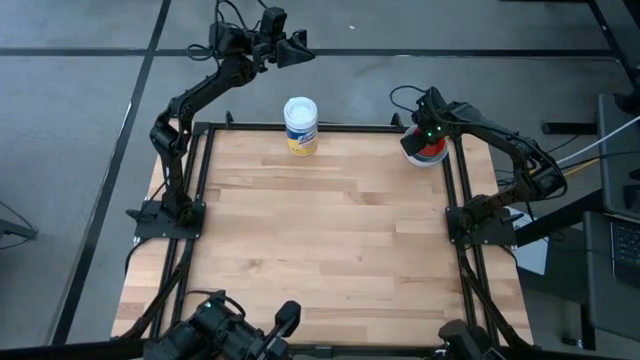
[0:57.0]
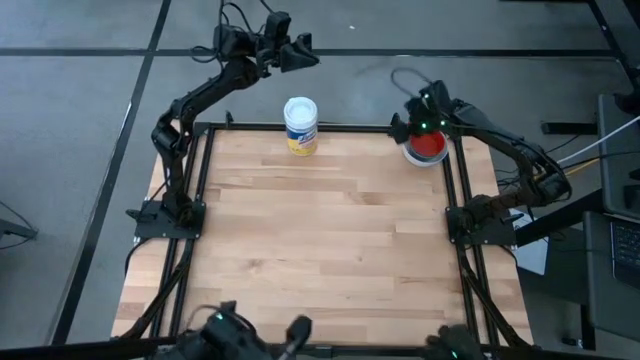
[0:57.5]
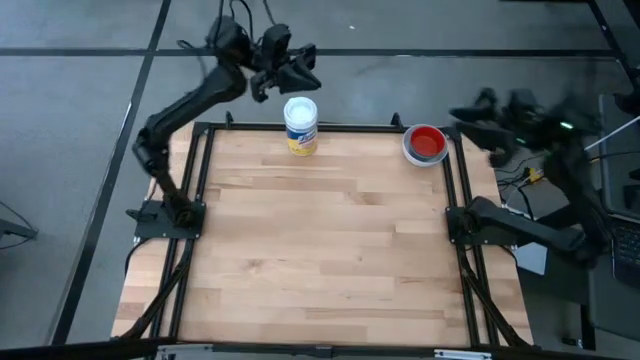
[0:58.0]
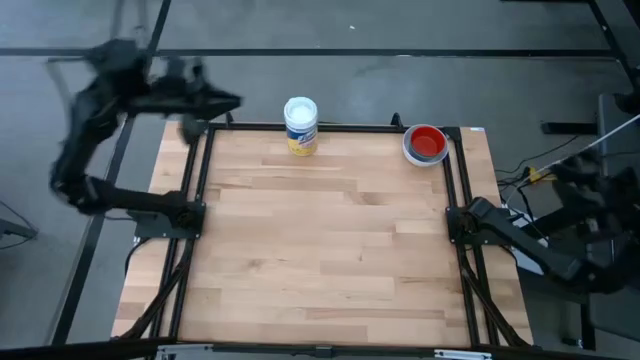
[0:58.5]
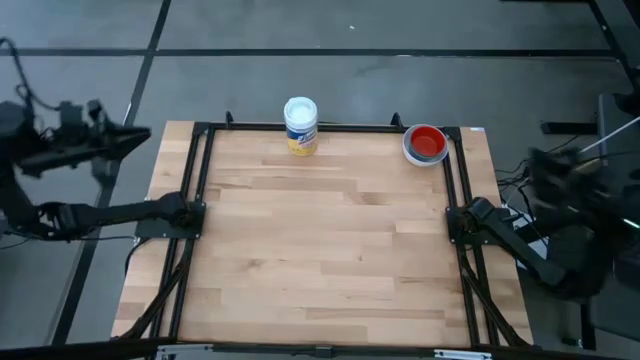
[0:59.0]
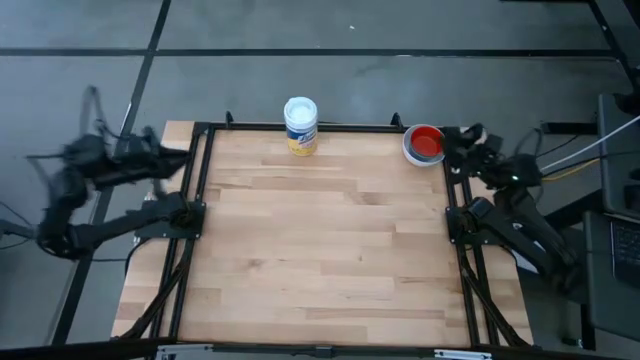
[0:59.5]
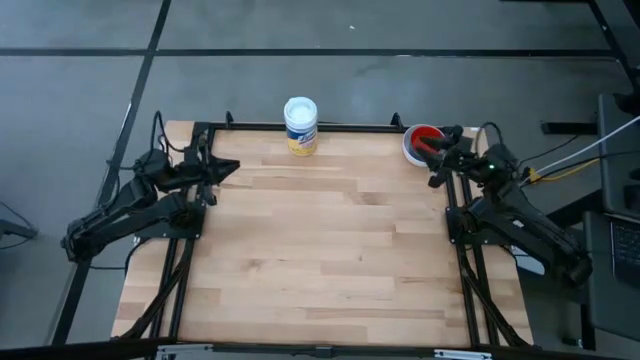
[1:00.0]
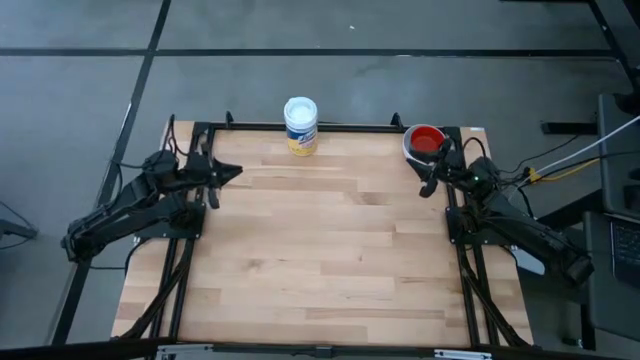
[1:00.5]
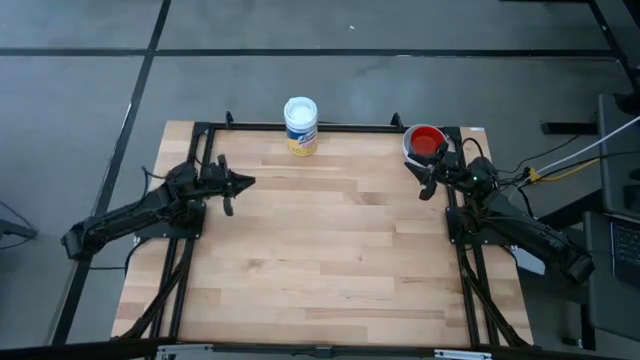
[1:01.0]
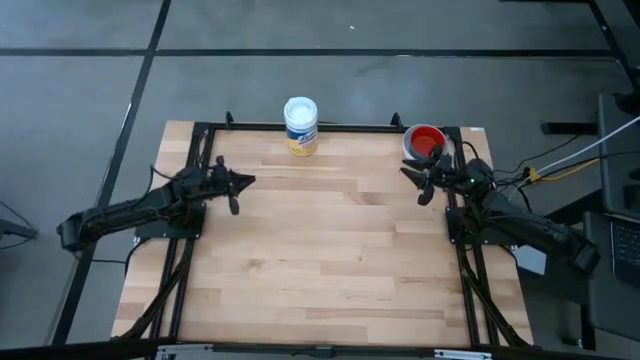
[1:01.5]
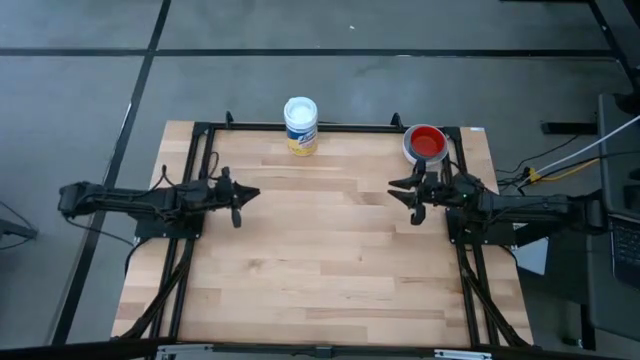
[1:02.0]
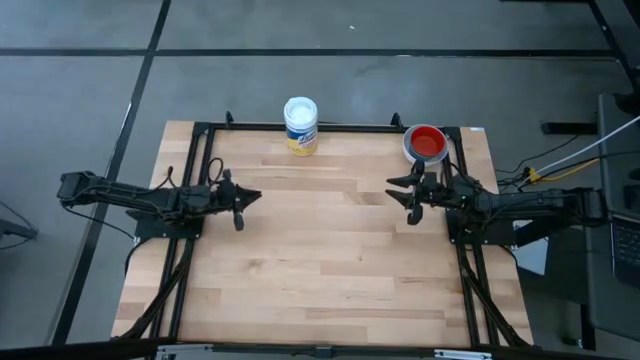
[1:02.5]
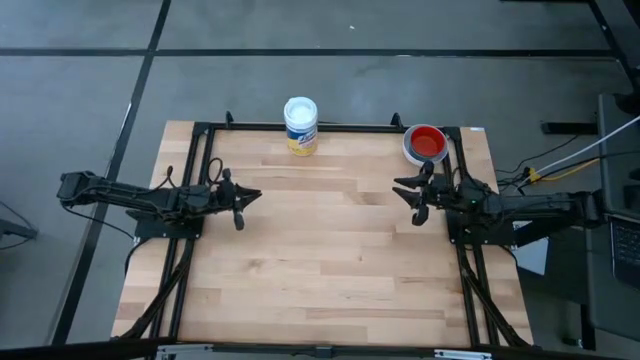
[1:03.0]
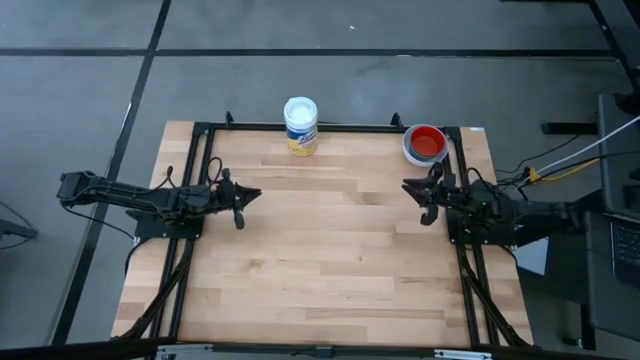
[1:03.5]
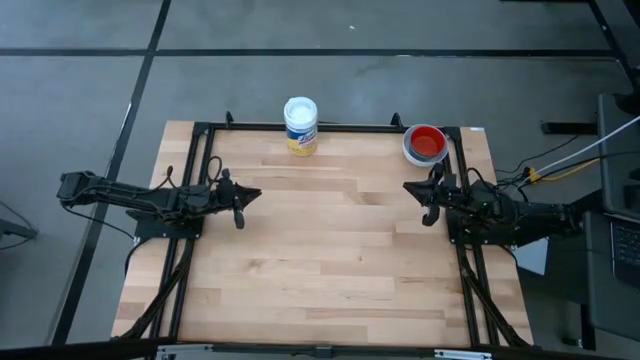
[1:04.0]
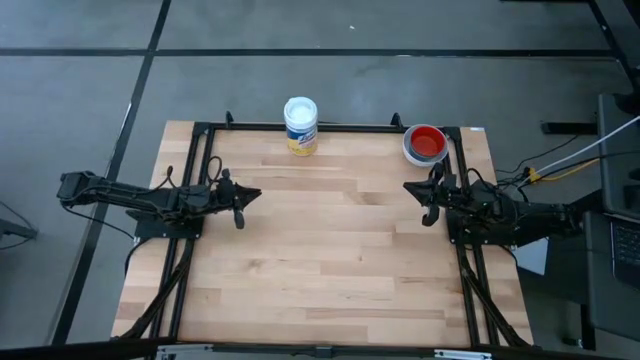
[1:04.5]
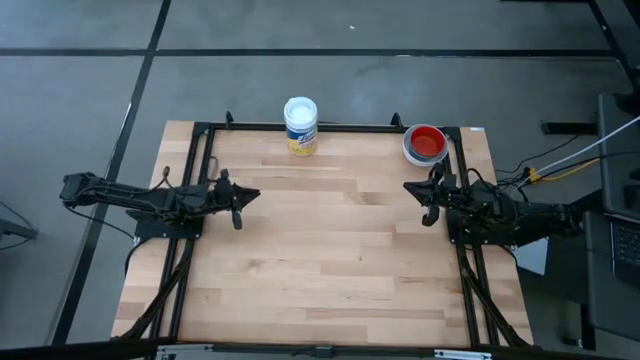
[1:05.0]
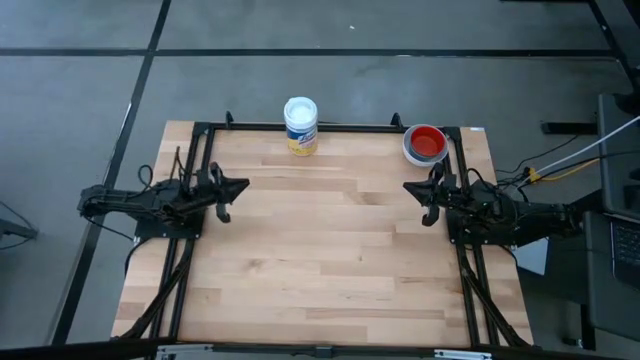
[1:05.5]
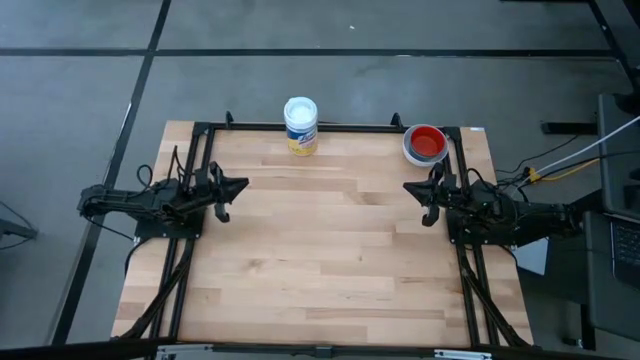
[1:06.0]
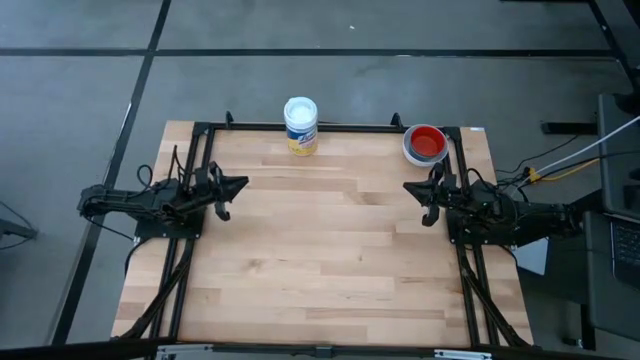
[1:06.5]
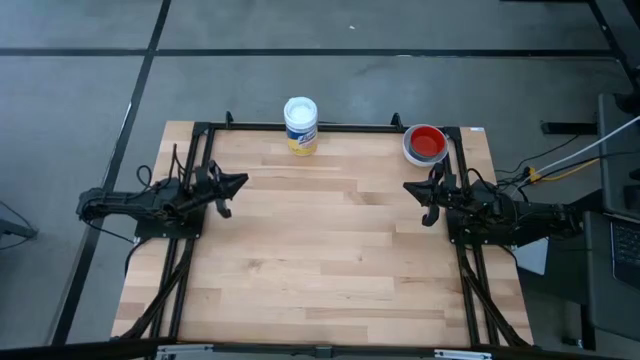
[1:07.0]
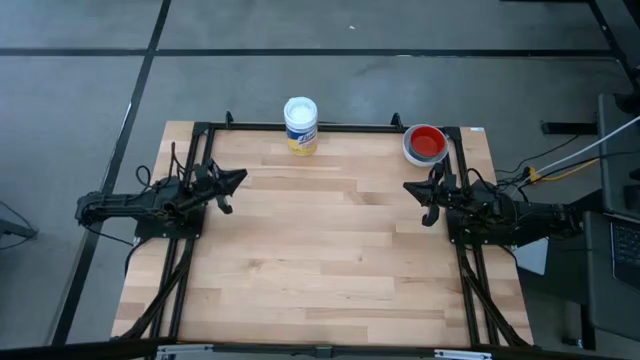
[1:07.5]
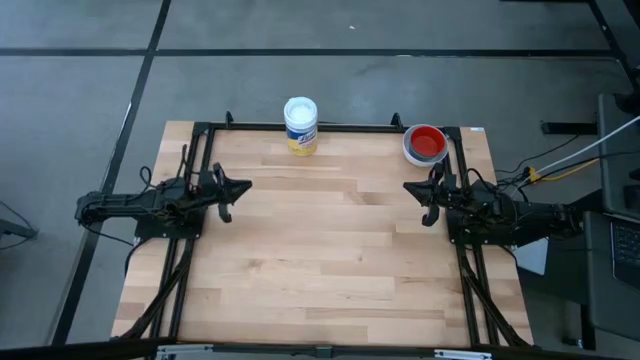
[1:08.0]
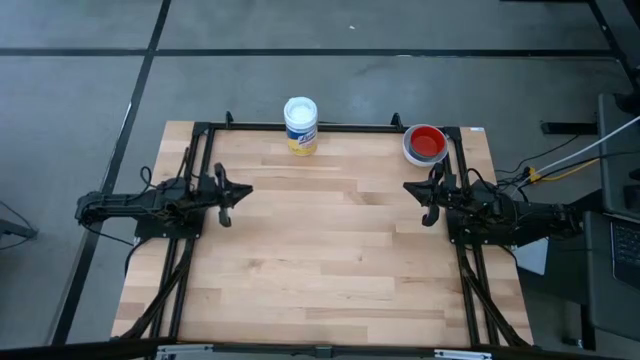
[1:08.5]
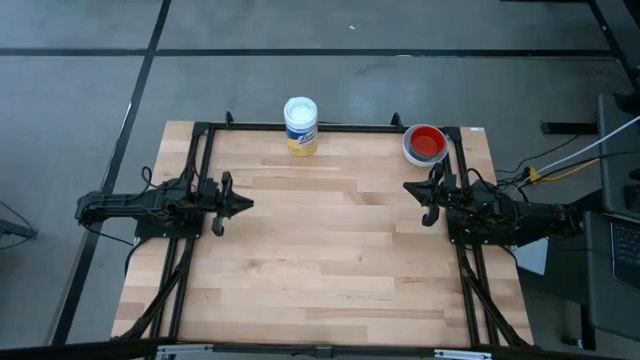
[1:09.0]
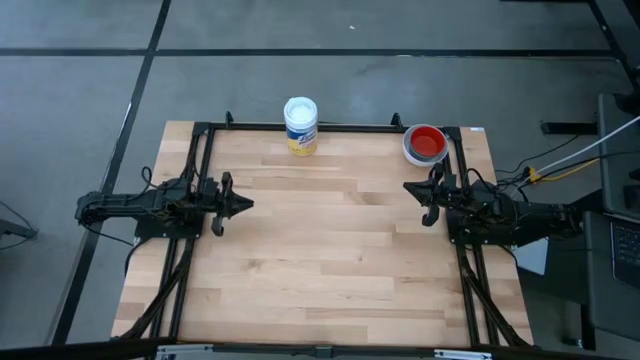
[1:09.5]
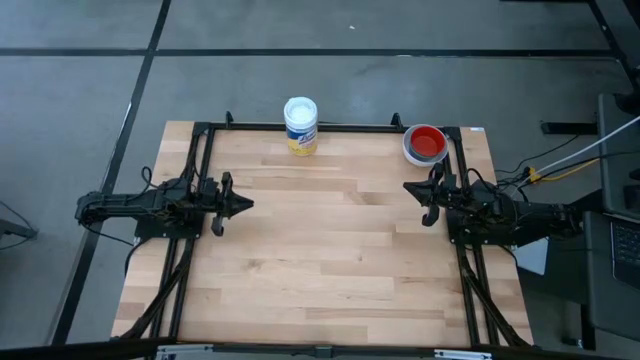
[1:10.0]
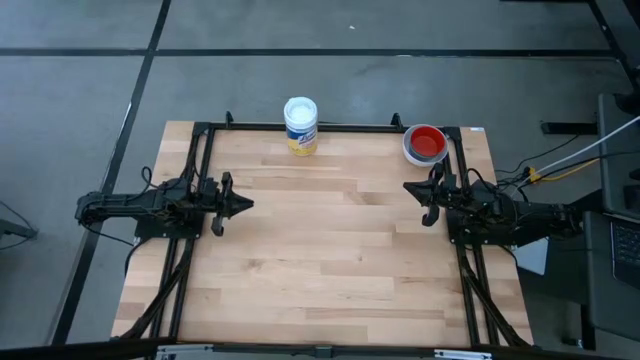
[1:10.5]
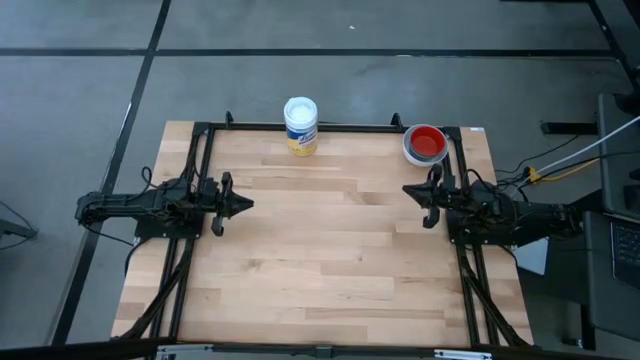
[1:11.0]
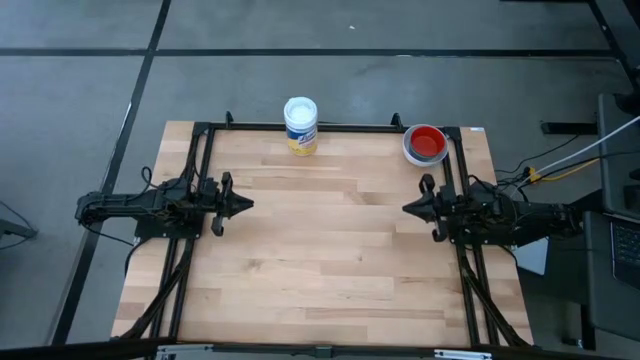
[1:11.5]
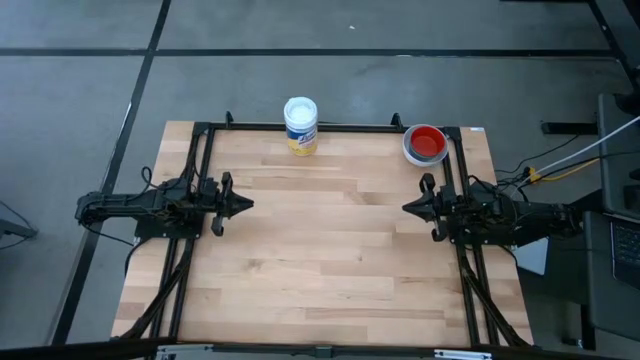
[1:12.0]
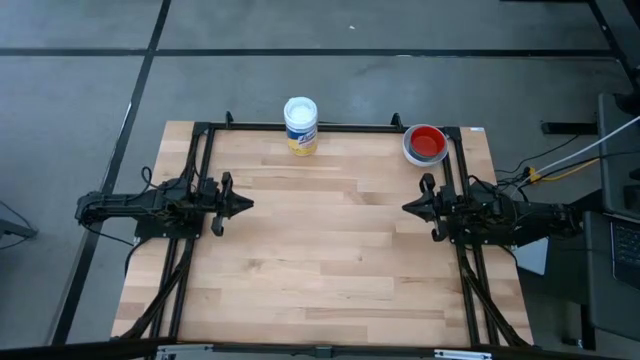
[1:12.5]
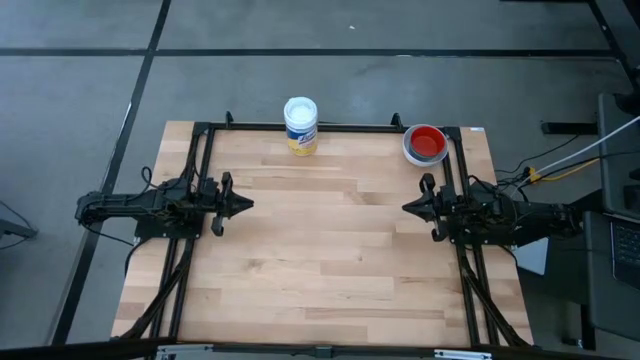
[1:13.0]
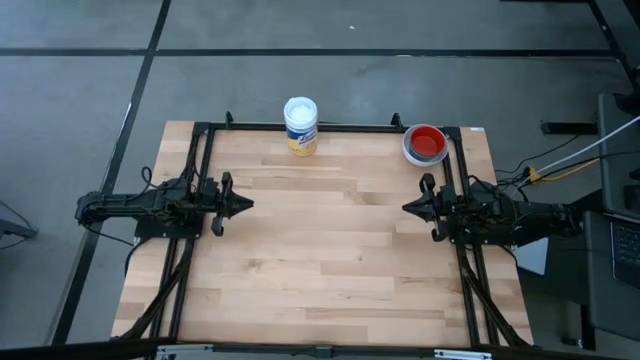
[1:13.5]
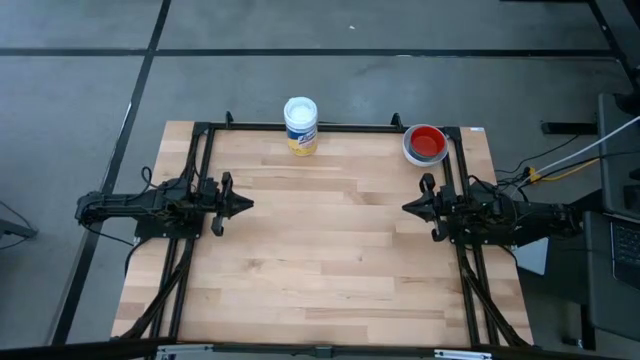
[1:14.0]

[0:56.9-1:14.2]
Return to Home Position

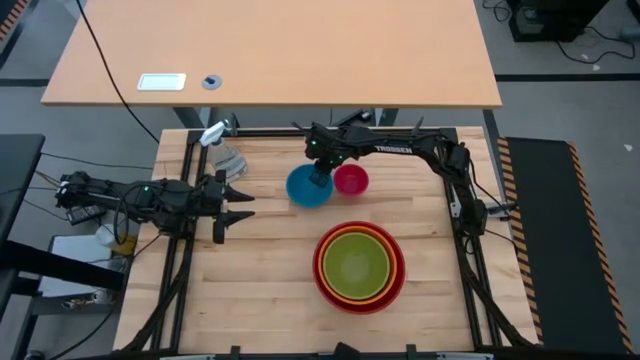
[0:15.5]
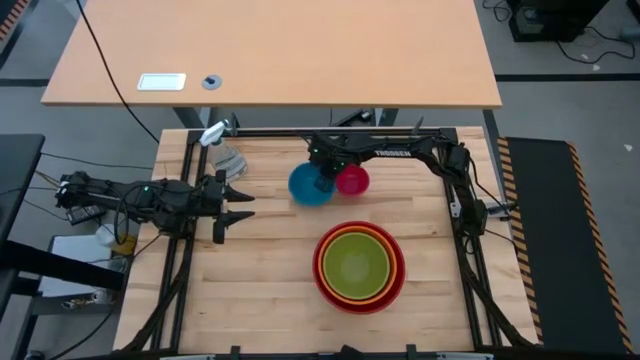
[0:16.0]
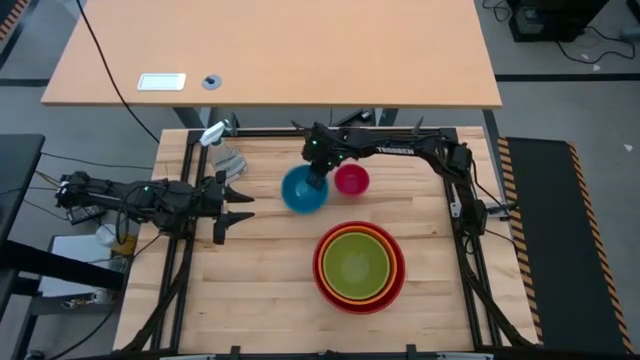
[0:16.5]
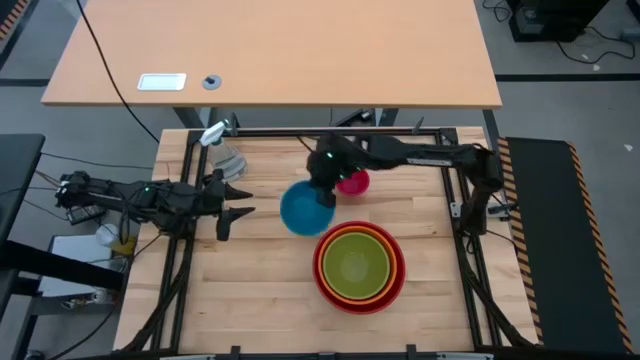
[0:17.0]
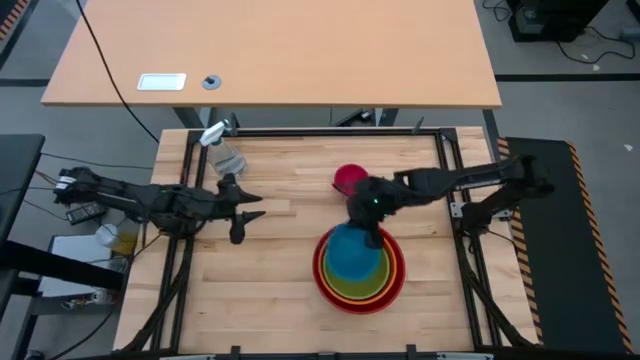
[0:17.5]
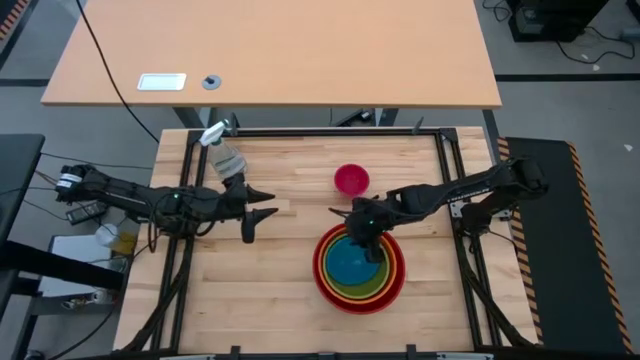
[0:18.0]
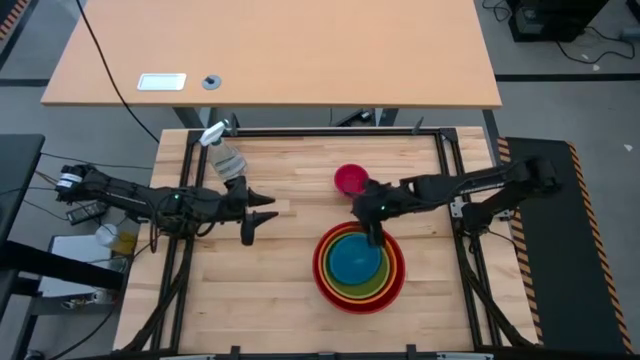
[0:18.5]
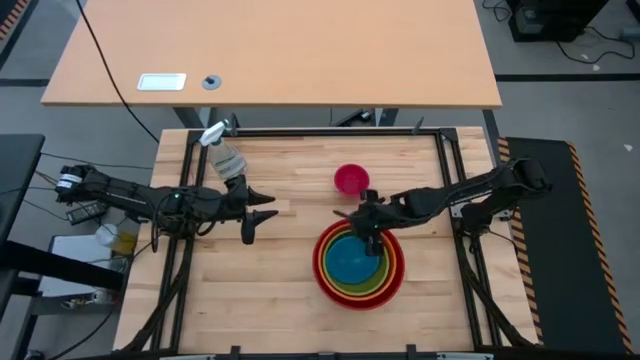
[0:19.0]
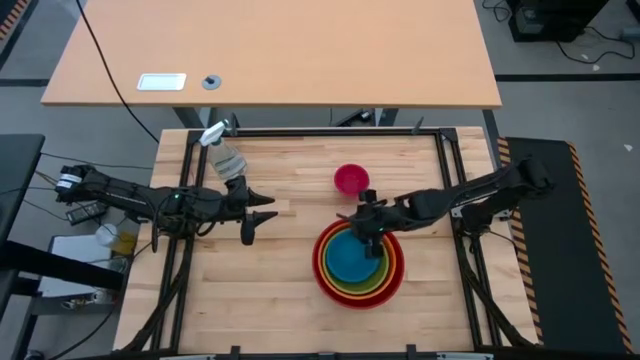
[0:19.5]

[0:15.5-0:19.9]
Stack the blue bowl on top of the green bowl
